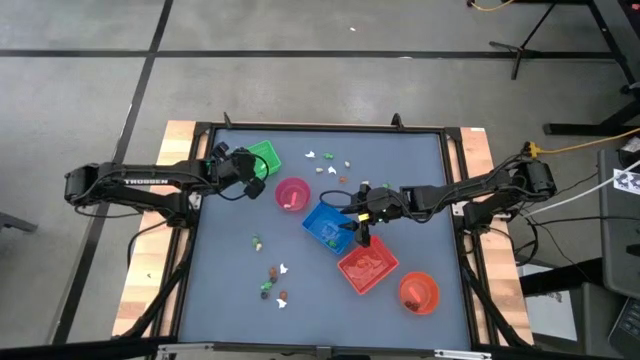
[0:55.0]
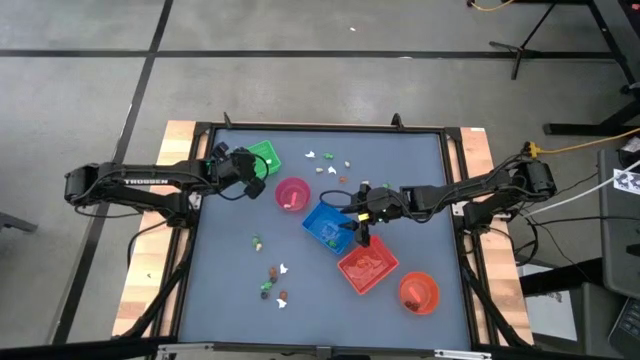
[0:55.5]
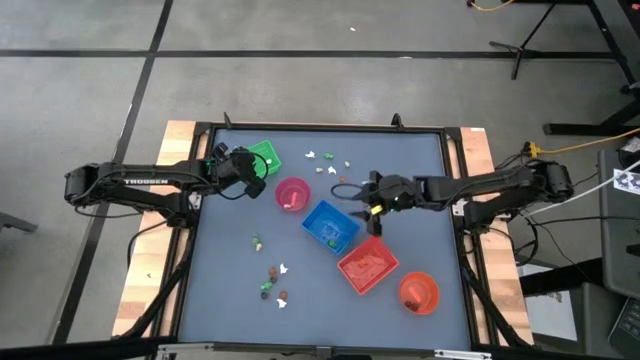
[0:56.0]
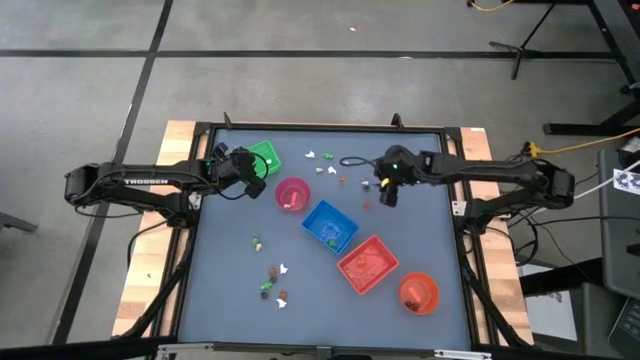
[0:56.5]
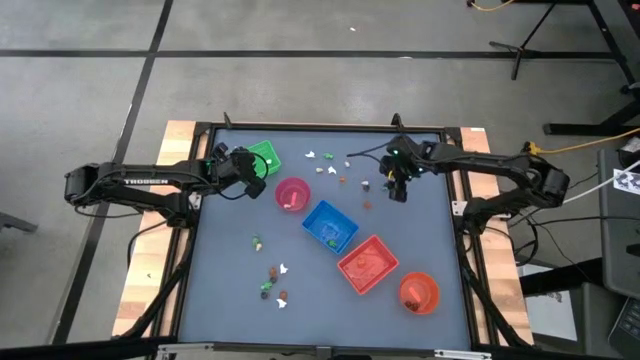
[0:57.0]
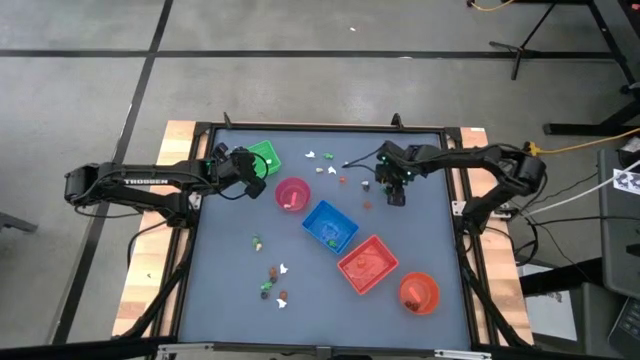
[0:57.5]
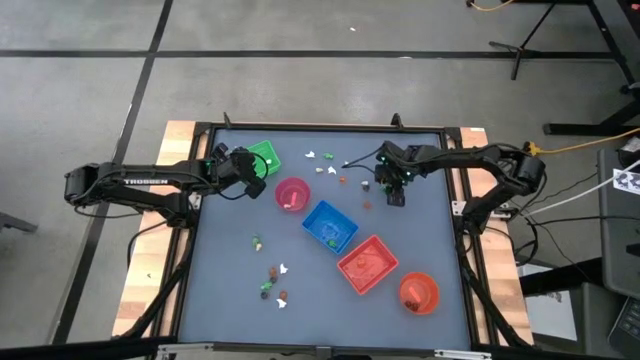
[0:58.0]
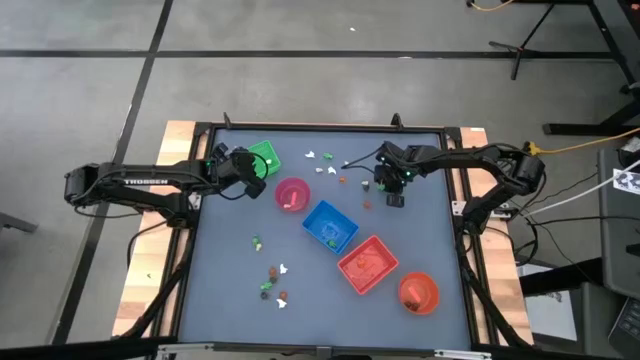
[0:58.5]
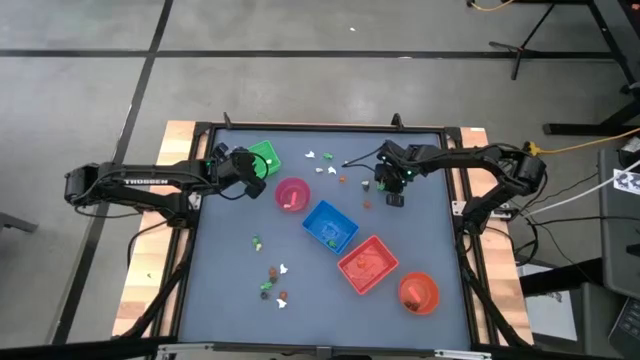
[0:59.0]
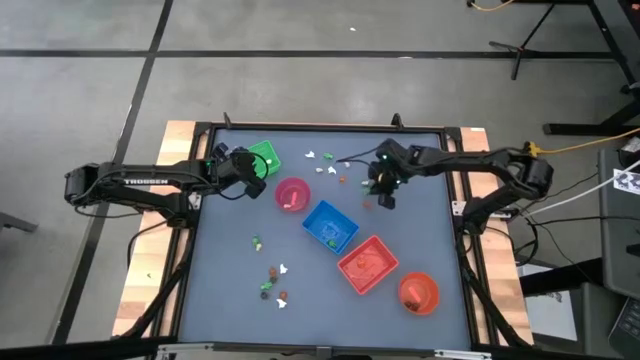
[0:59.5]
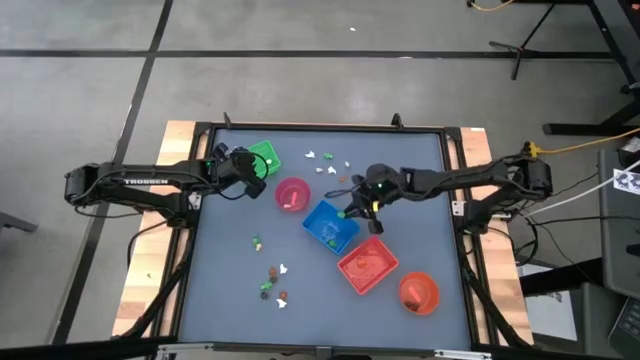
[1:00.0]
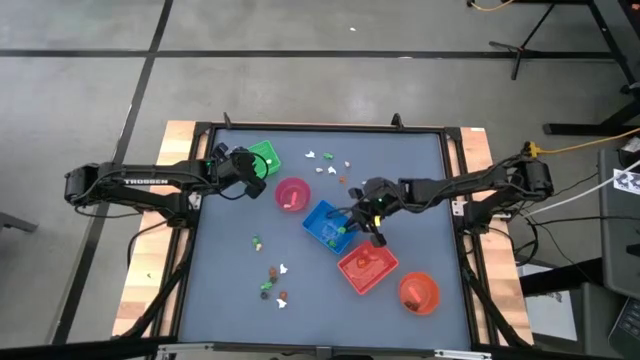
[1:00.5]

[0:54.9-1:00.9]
Task: Sort Halloween decoration
Put the green skeleton toy into the blue bin

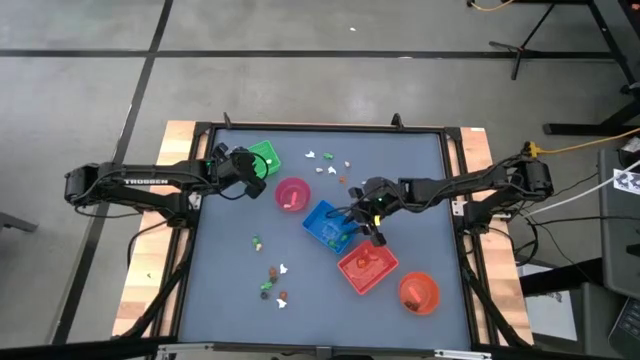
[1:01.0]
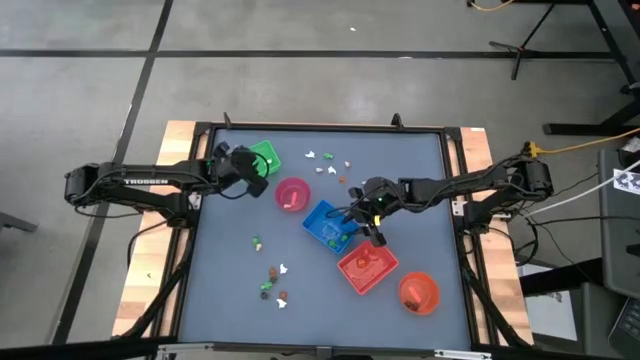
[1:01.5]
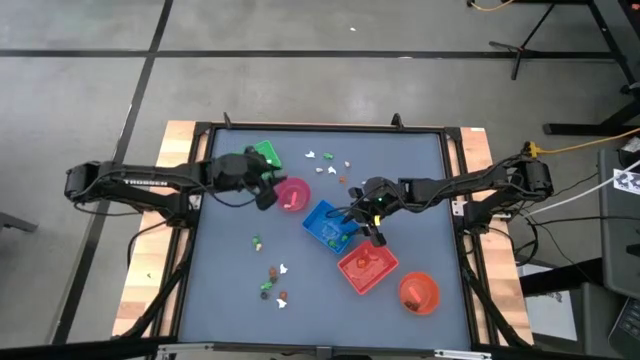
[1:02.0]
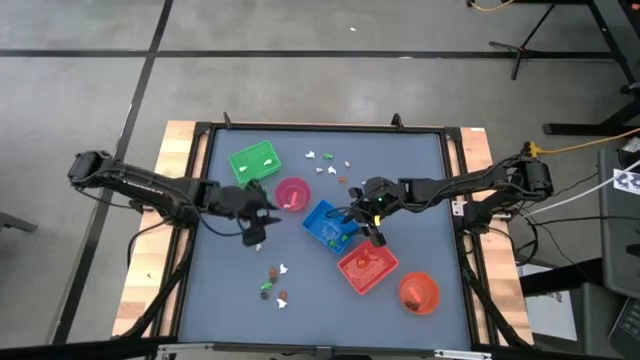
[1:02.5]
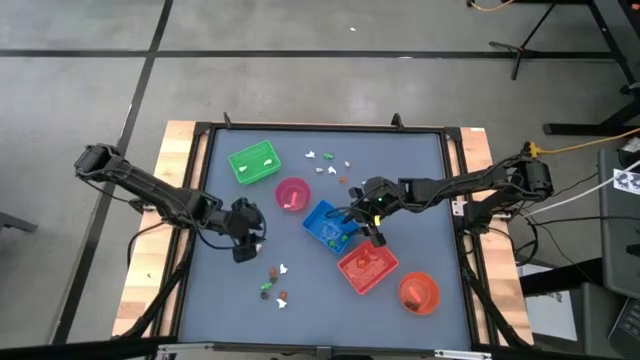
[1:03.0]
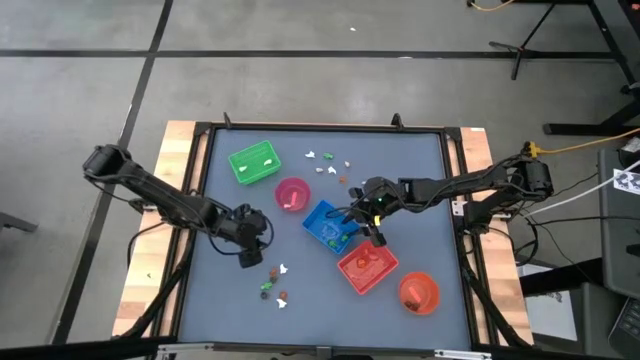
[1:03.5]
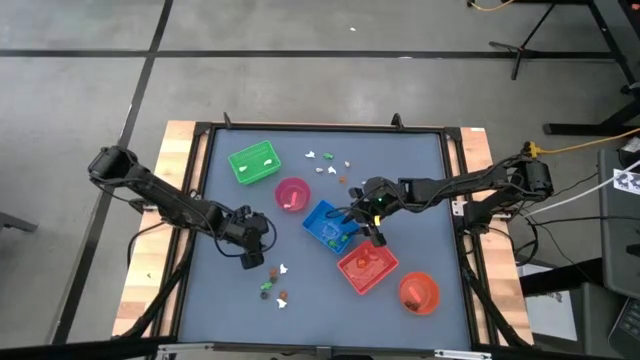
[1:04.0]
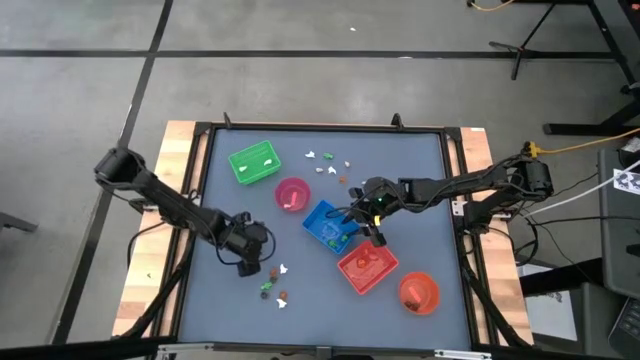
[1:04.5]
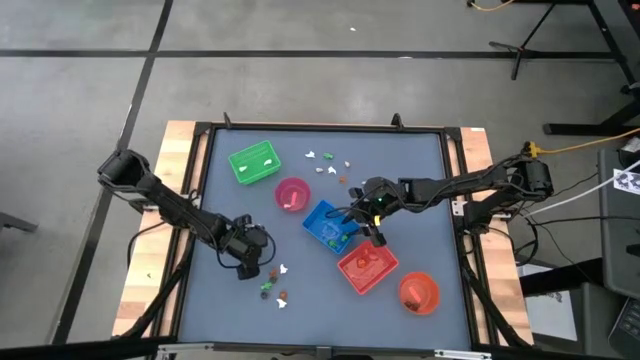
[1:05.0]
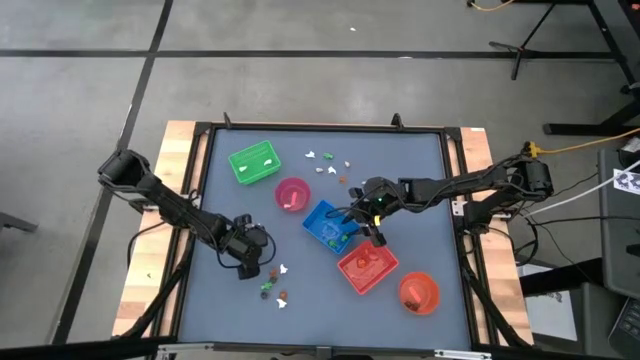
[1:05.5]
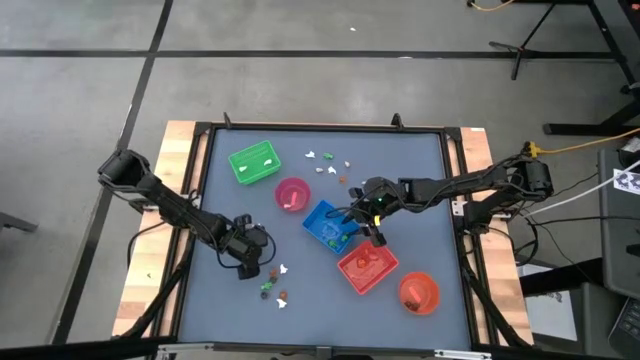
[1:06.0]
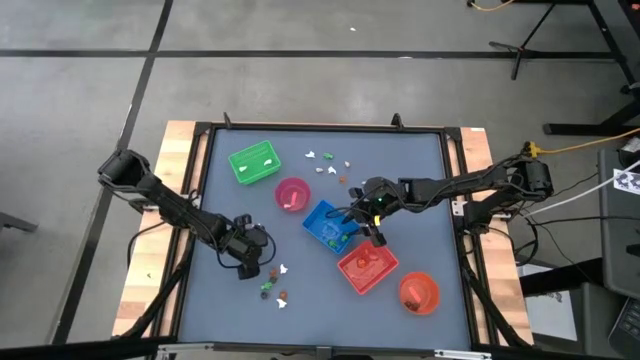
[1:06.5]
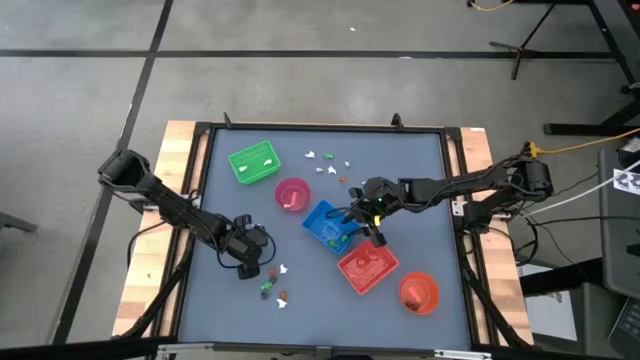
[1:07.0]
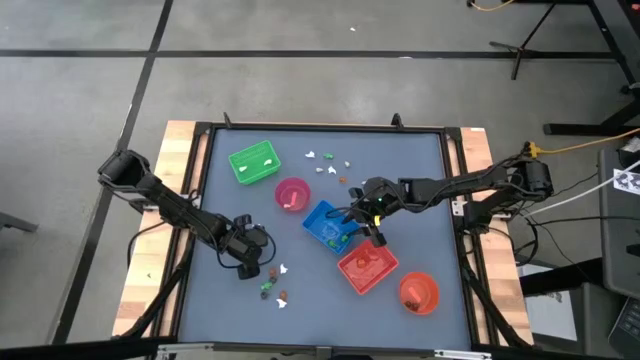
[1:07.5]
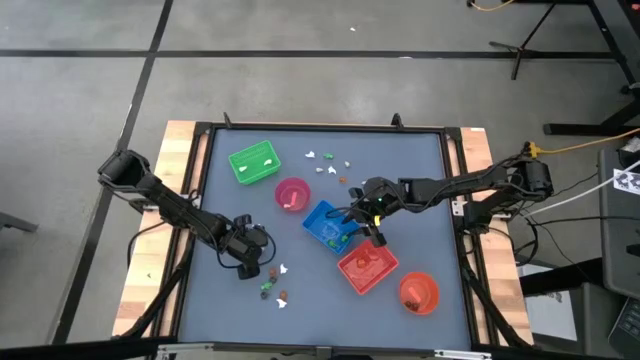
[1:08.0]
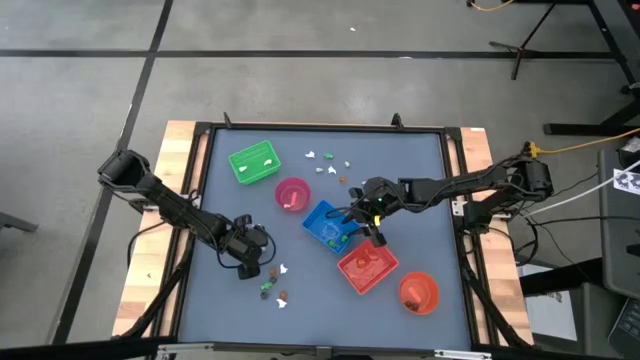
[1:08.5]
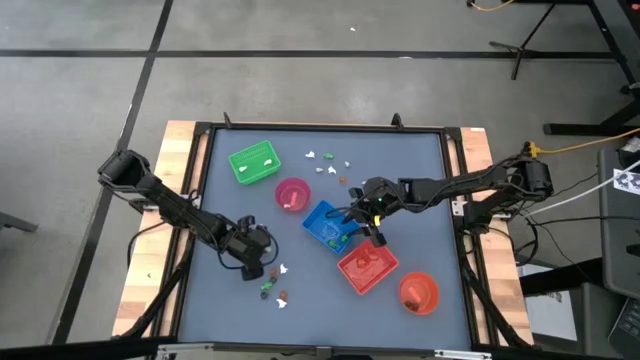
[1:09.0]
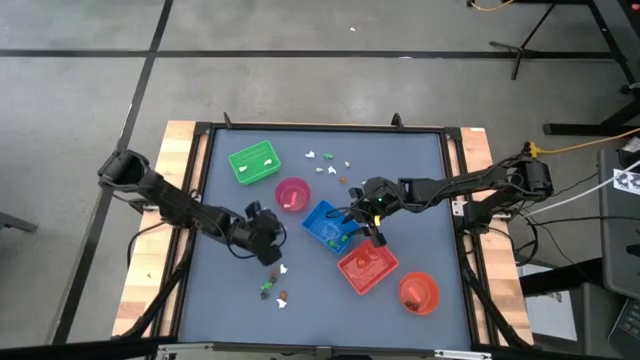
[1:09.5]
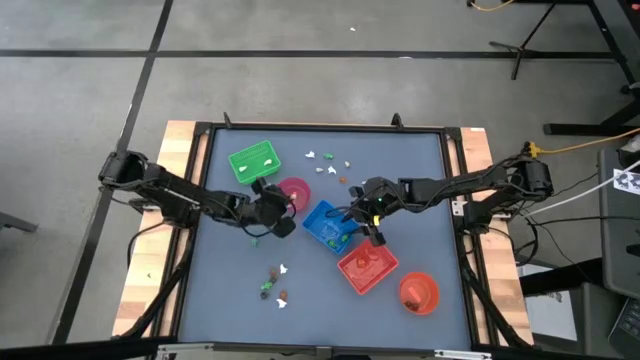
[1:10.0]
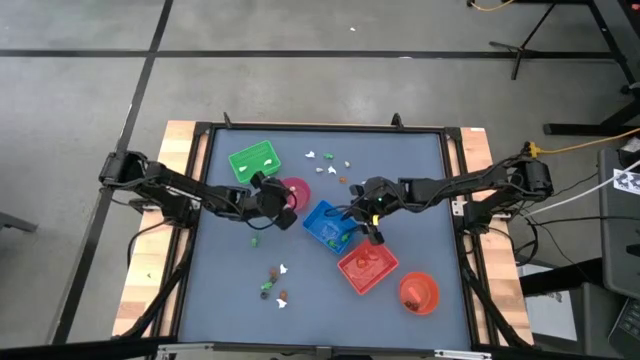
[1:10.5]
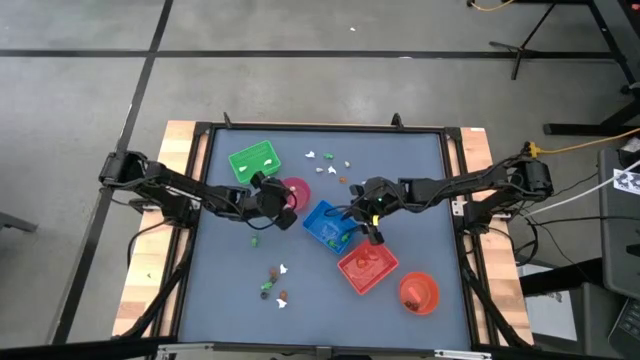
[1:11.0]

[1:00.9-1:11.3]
Put the light brown skull toy into the light red bin

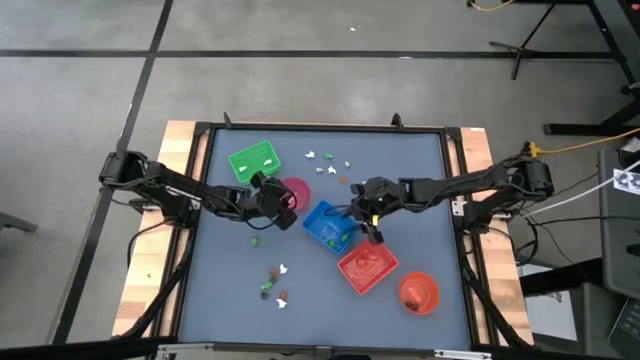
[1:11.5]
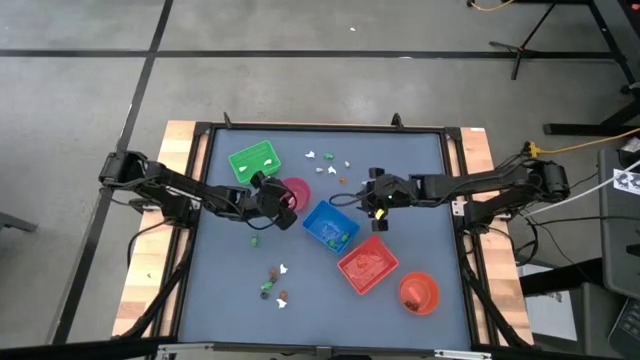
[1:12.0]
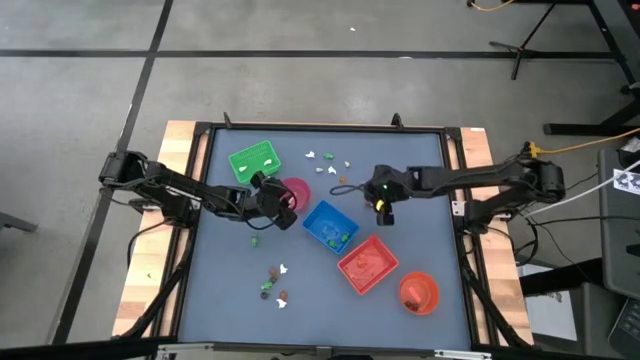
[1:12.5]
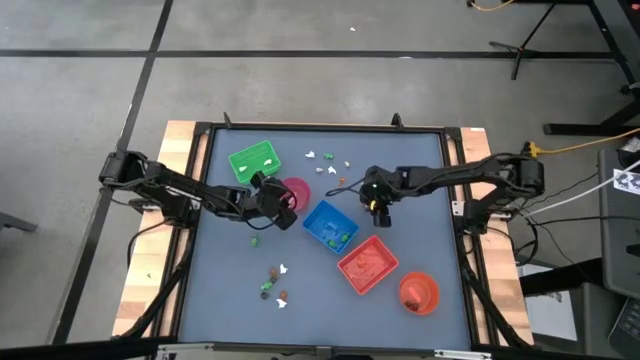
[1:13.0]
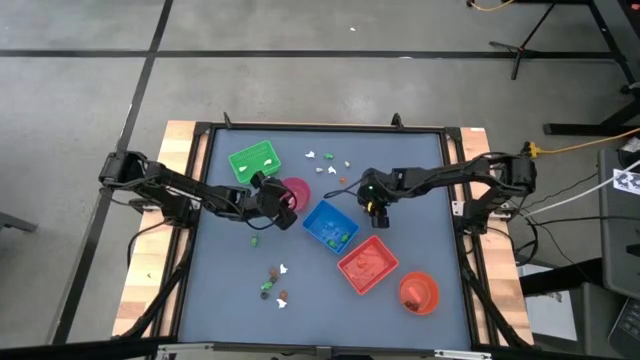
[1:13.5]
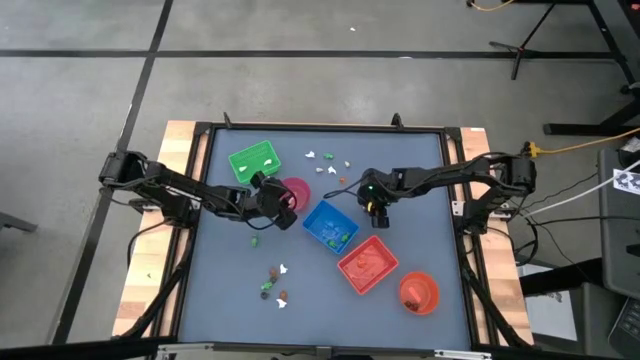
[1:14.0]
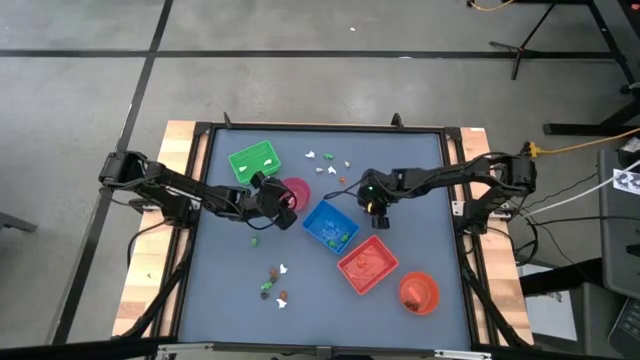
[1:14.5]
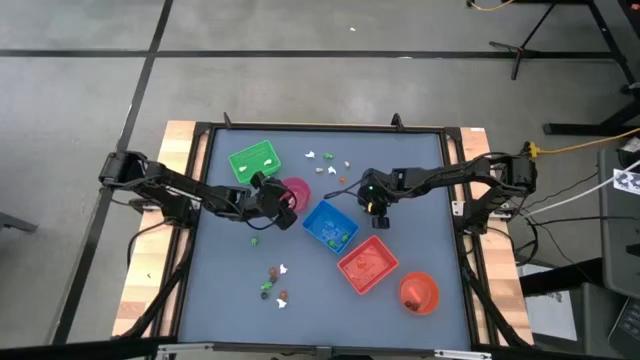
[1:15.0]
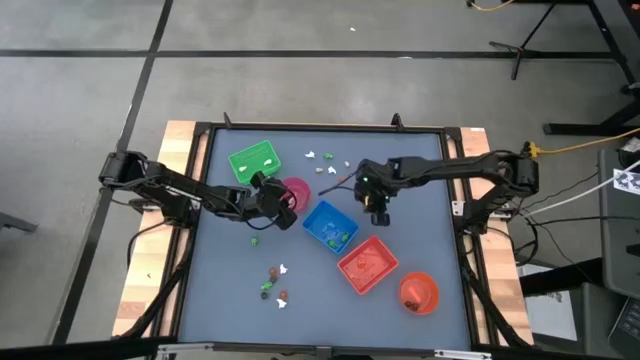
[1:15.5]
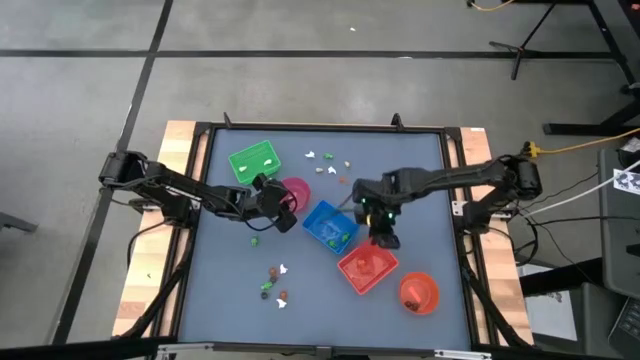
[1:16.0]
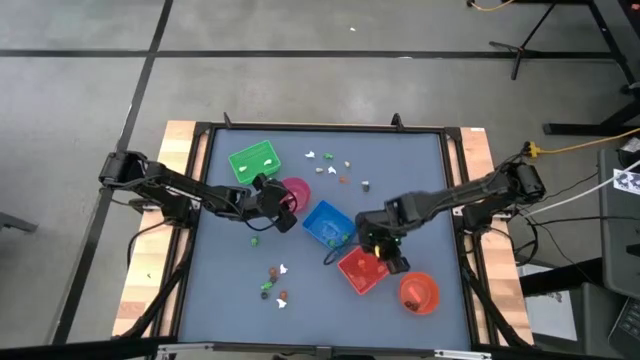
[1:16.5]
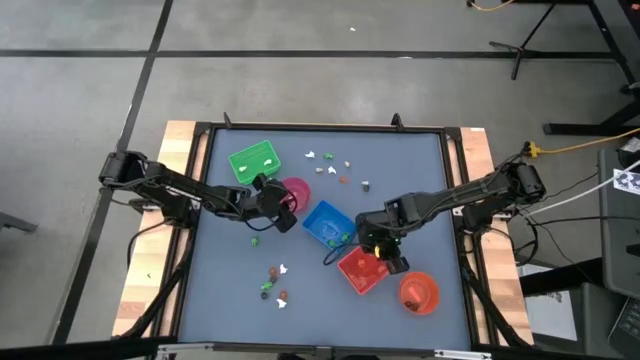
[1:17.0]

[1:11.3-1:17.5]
Put the orange pumpkin toy into the orange bin
